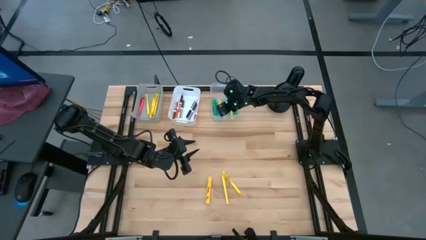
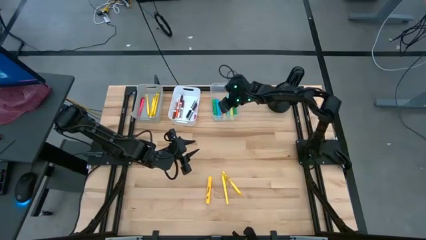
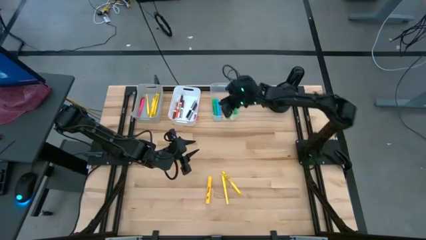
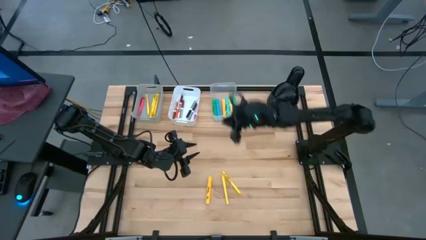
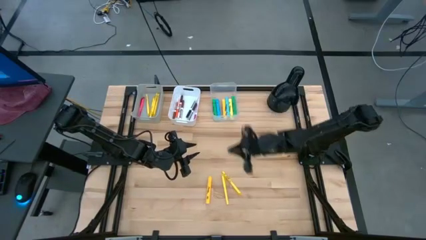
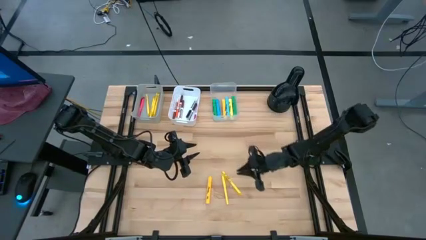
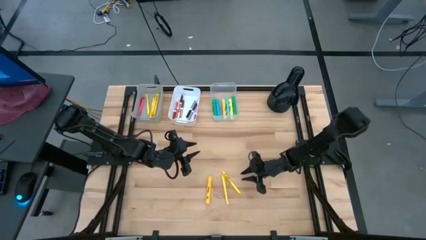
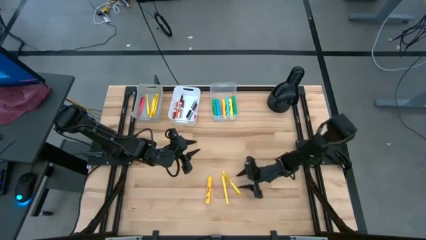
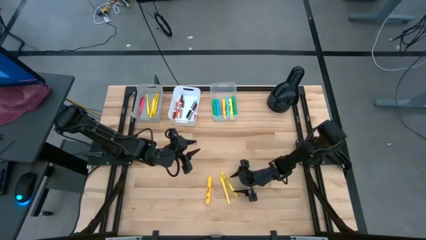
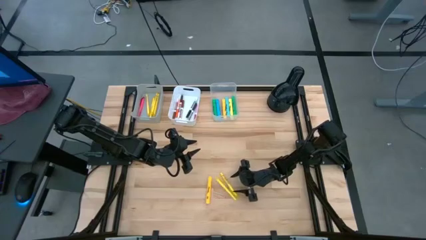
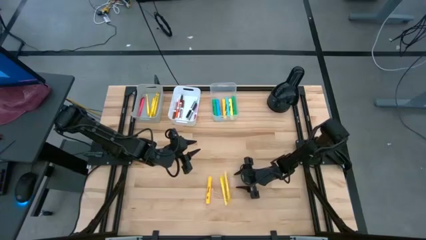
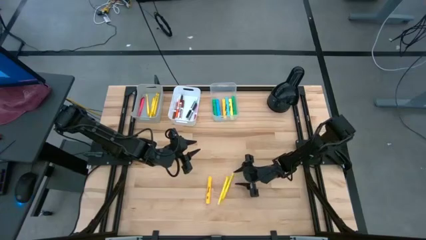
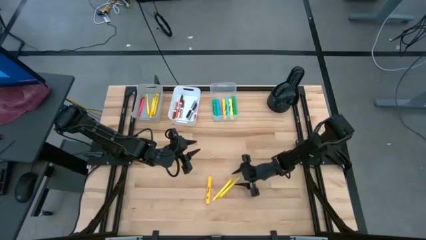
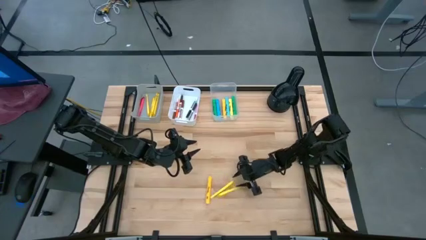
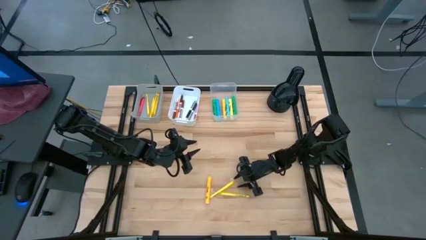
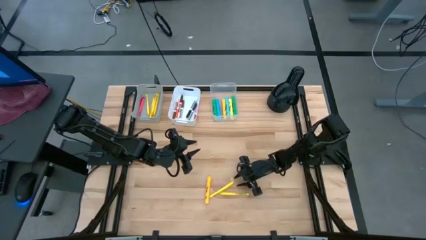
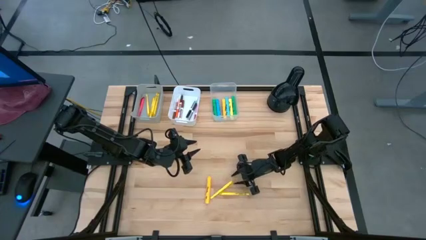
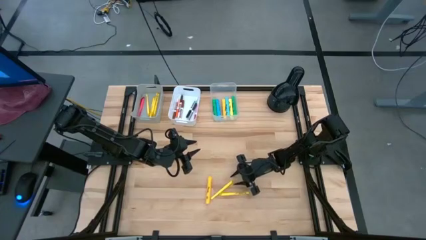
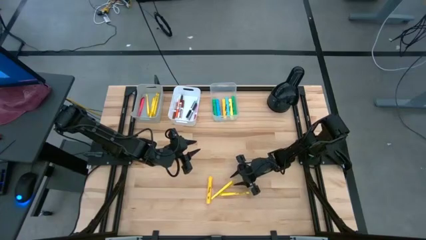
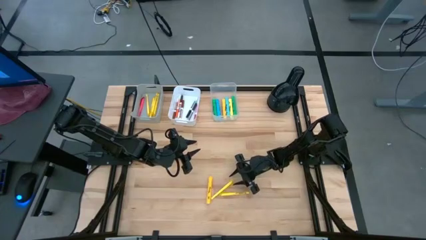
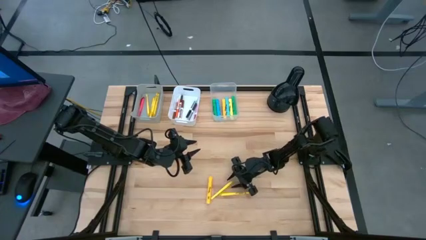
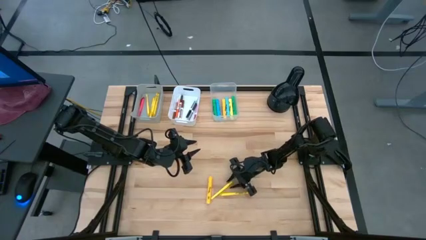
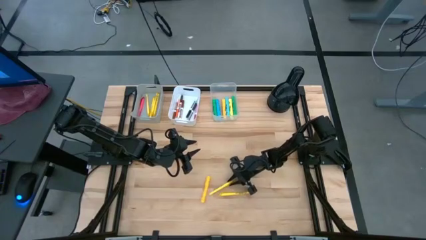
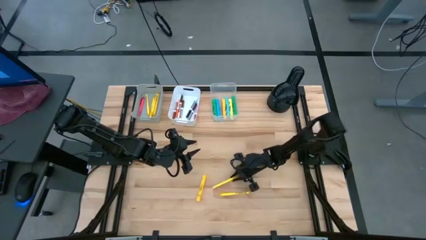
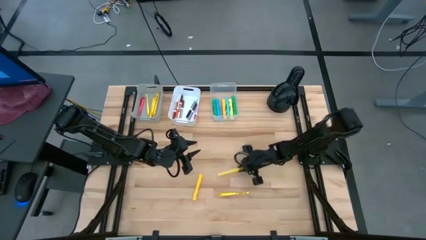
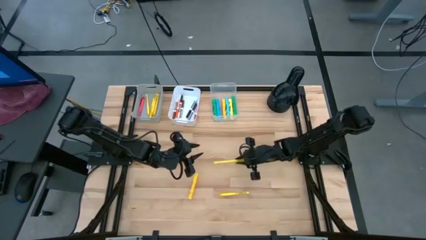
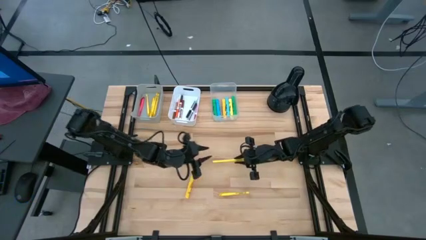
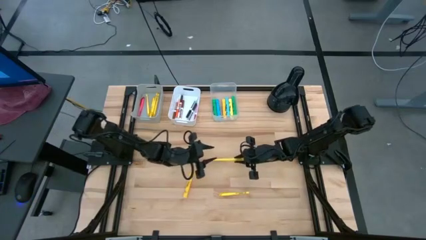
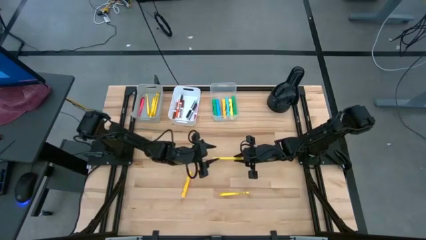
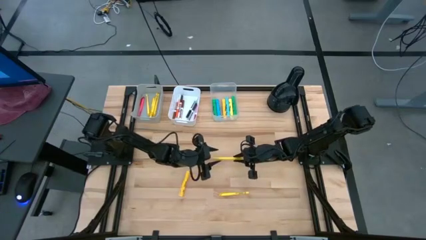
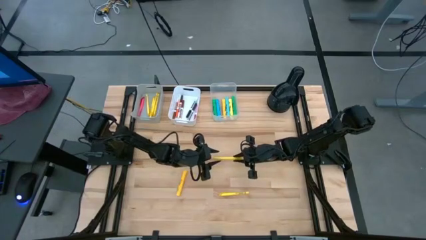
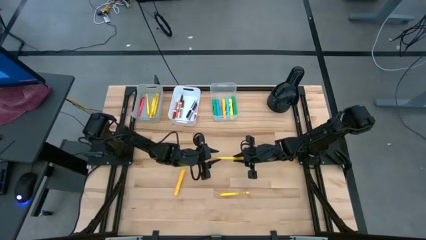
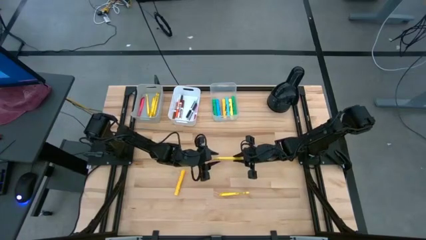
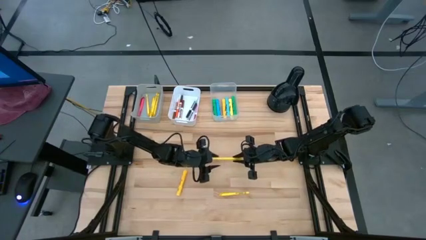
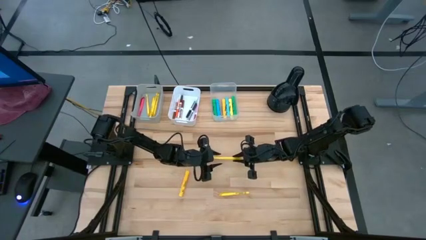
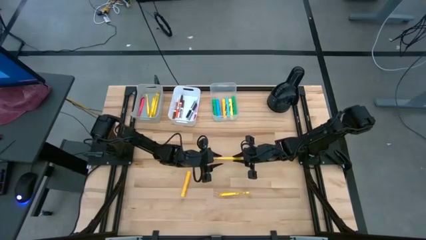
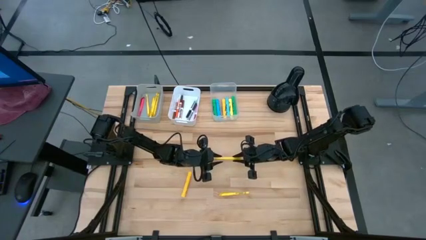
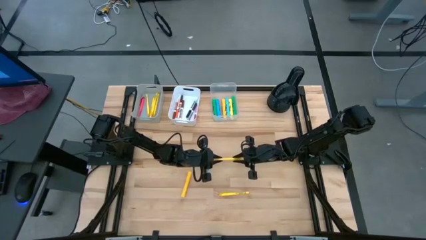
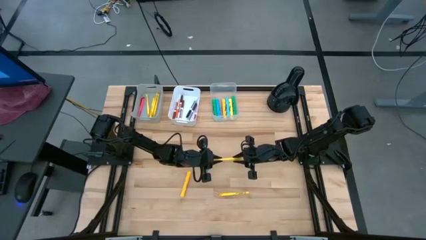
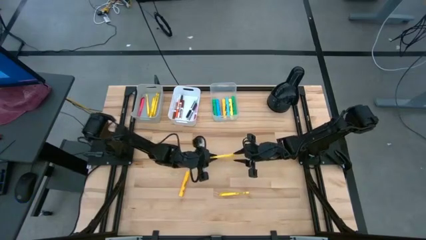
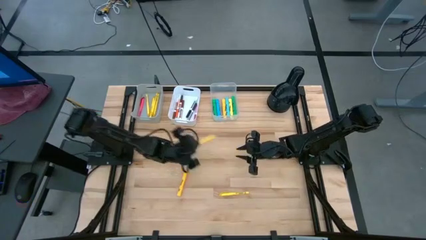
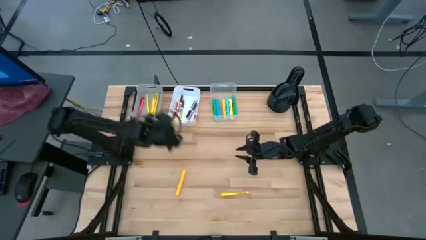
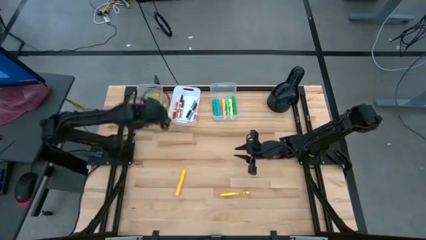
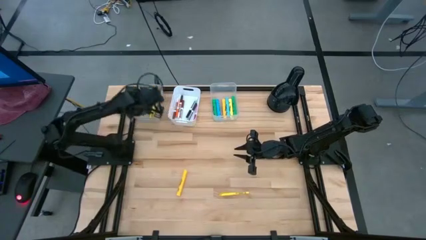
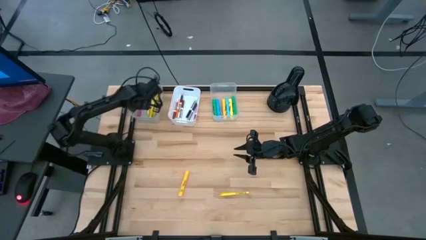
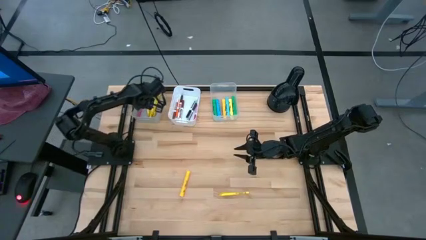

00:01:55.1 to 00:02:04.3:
Task: Pick & Place Markers
Put the yellow marker into the gray bin

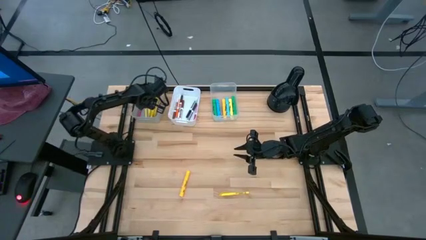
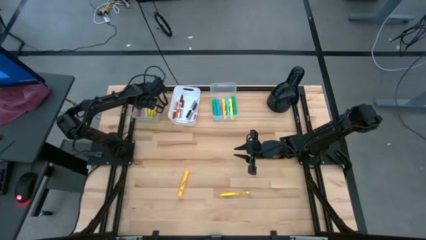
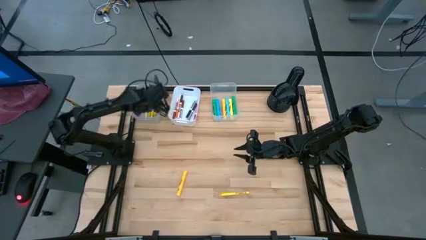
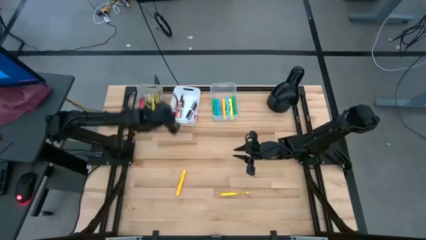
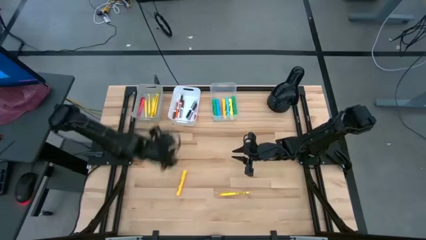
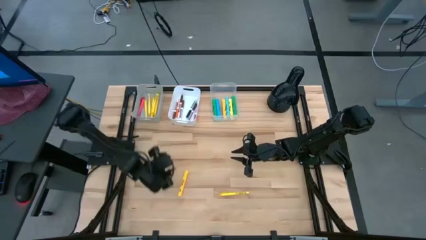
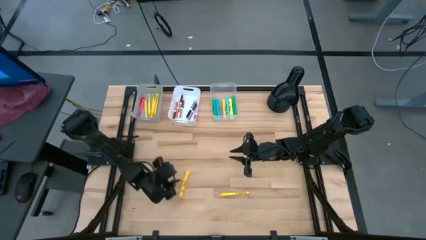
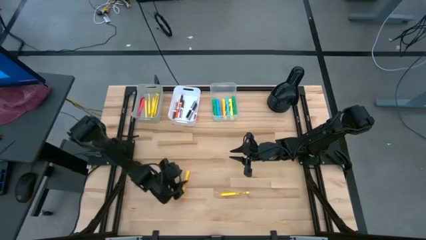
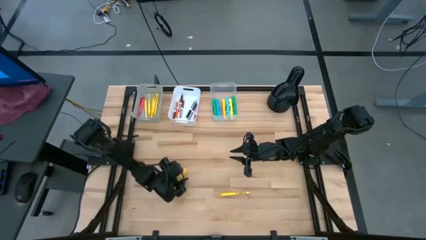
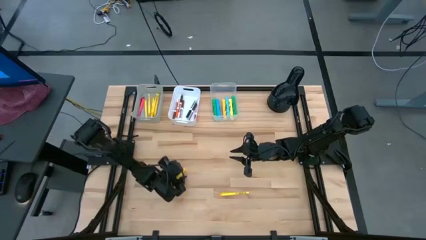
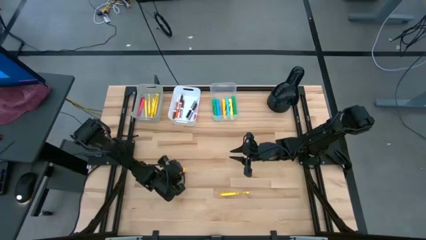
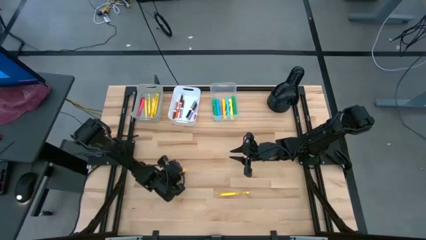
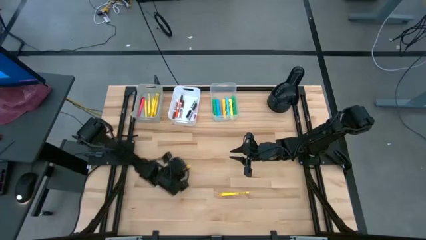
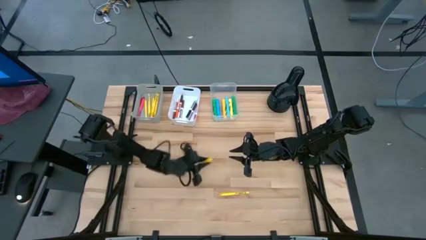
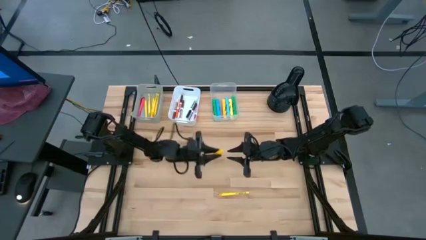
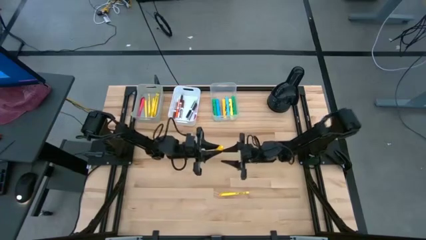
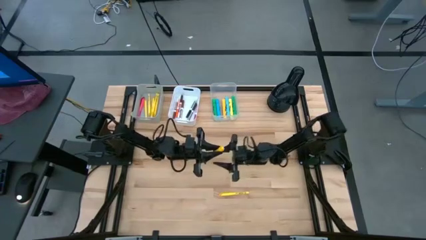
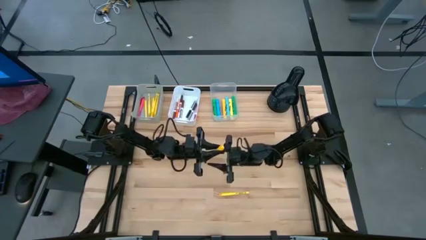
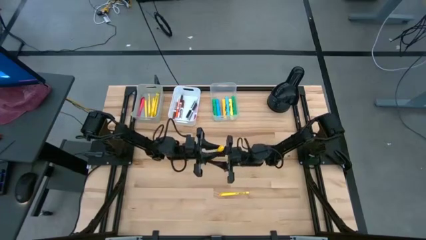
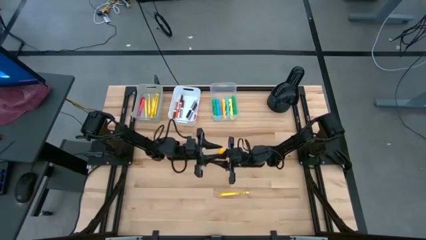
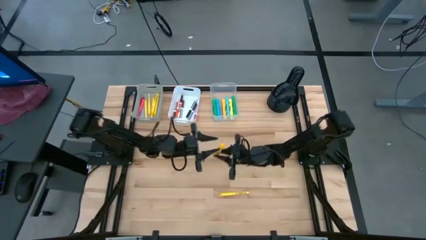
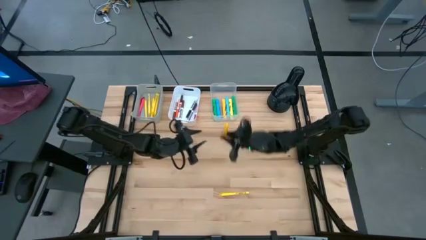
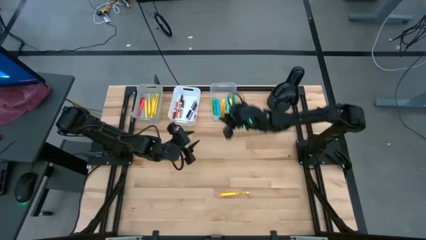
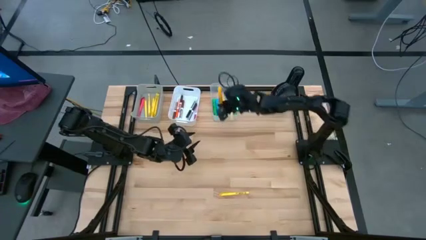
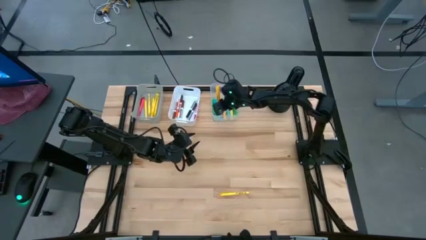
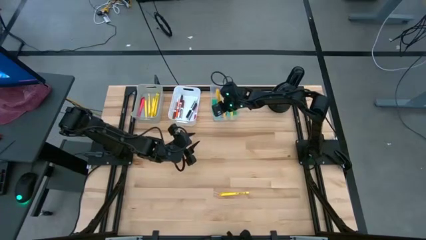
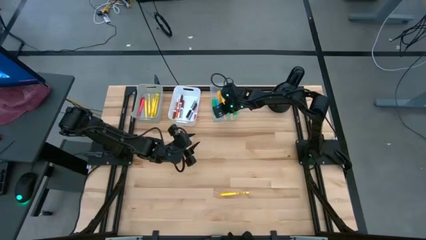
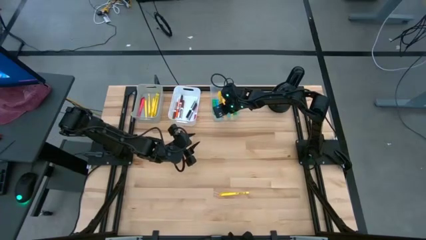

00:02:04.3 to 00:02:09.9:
Put the yellow highlighter into the transparent bin

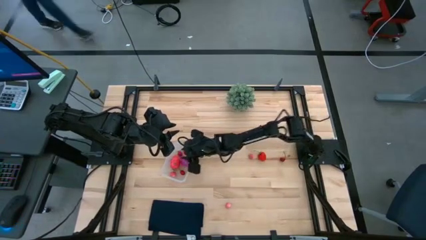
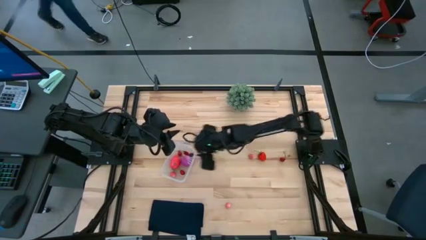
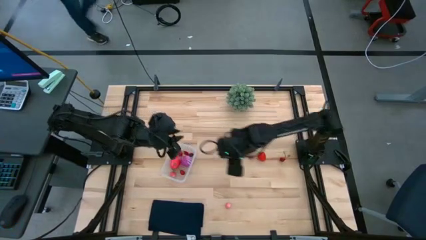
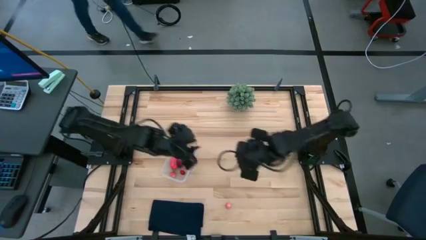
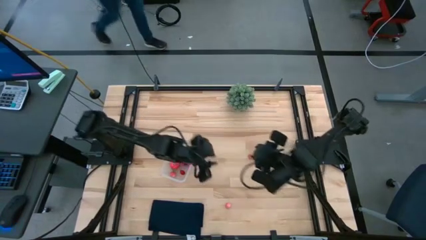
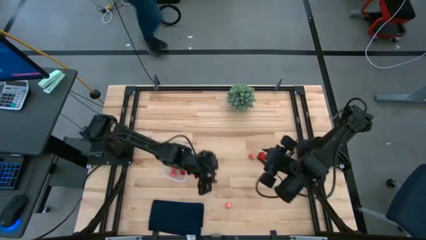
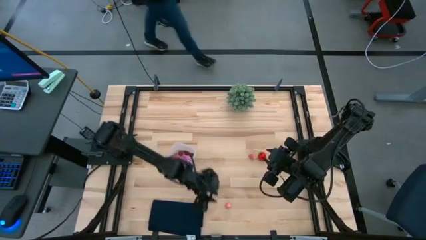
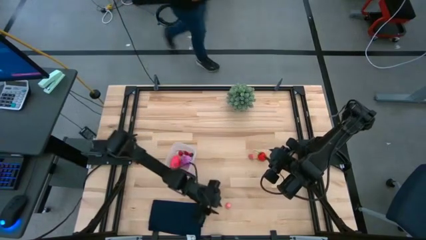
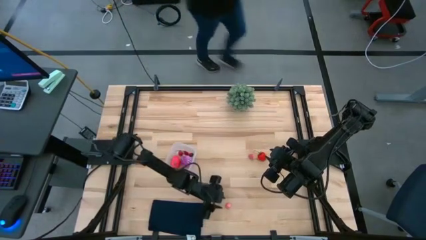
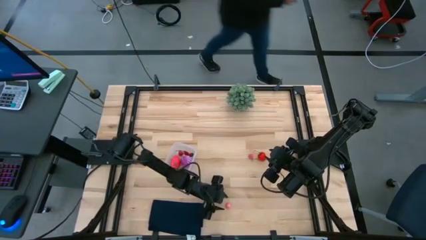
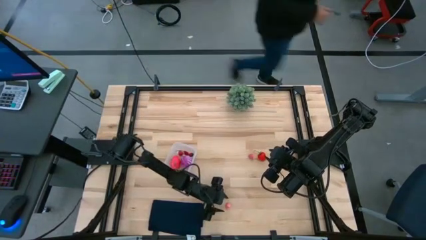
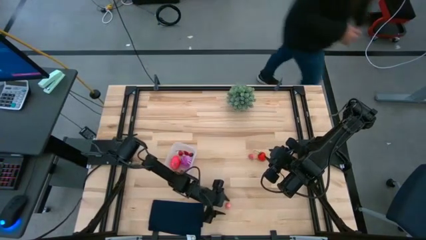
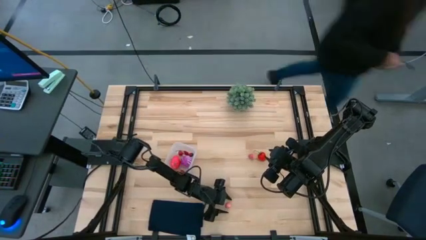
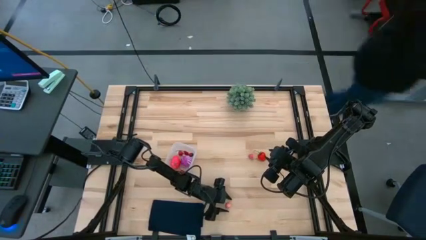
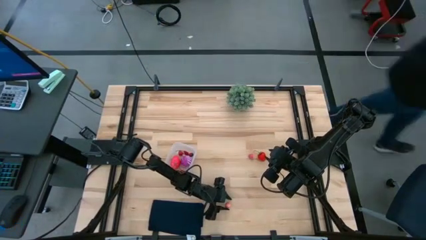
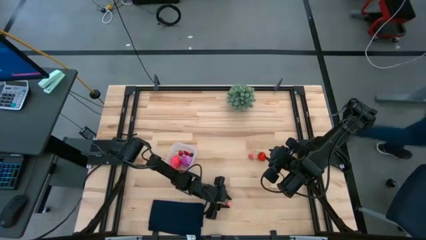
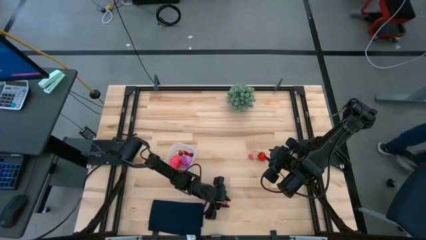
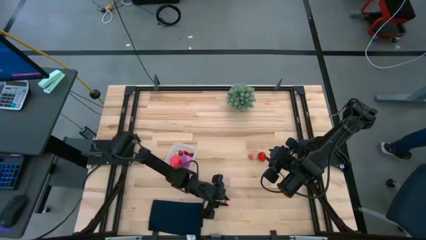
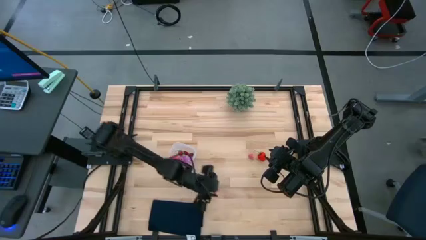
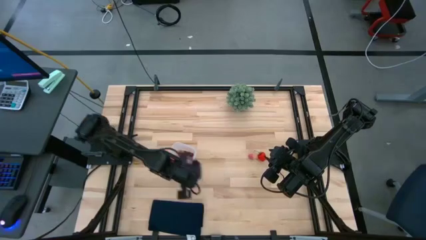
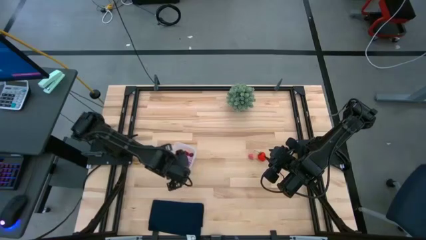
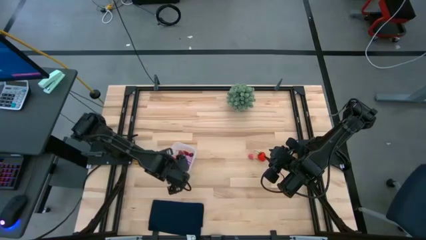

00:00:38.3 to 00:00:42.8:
Task: Pick and placing Produce into tupperware
Put the pink peach into the transparent bin
